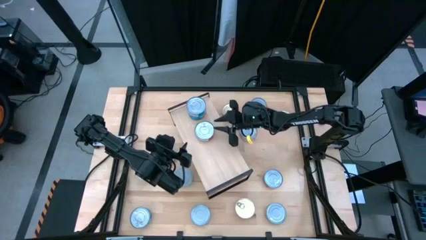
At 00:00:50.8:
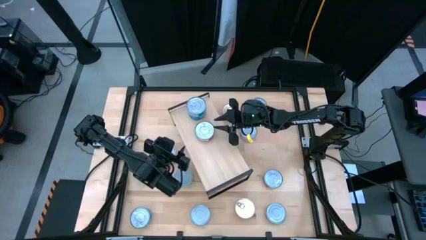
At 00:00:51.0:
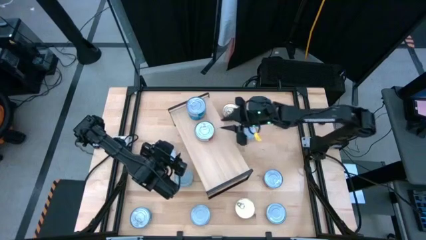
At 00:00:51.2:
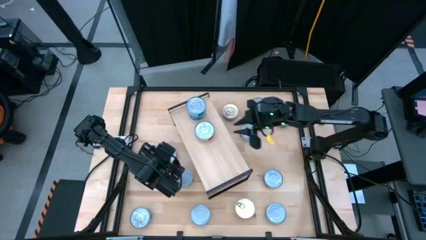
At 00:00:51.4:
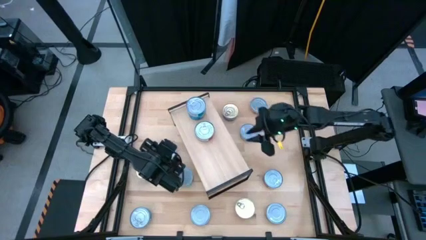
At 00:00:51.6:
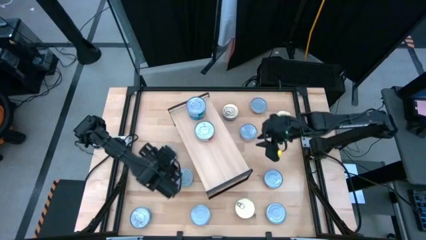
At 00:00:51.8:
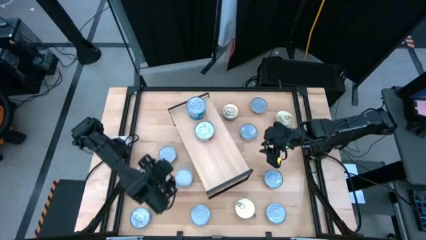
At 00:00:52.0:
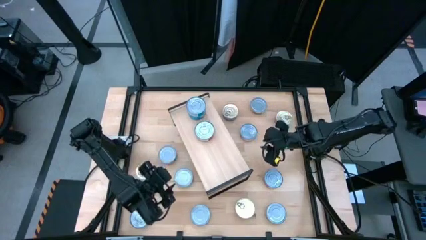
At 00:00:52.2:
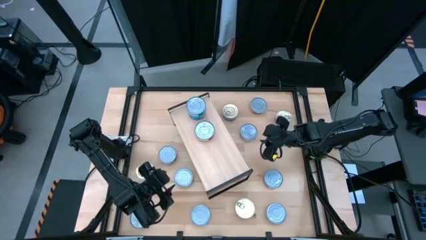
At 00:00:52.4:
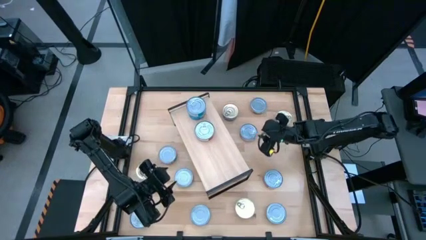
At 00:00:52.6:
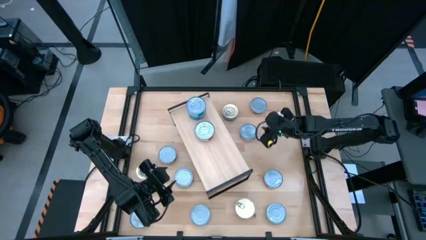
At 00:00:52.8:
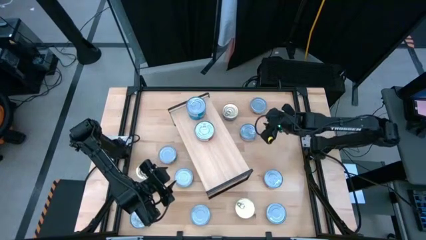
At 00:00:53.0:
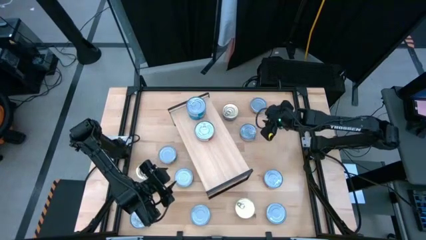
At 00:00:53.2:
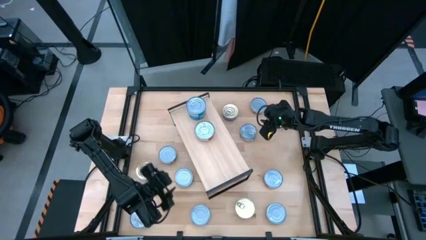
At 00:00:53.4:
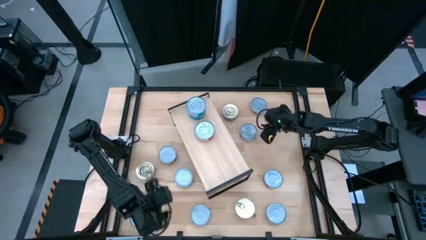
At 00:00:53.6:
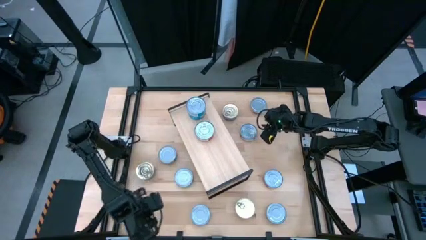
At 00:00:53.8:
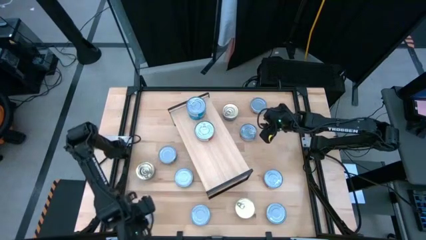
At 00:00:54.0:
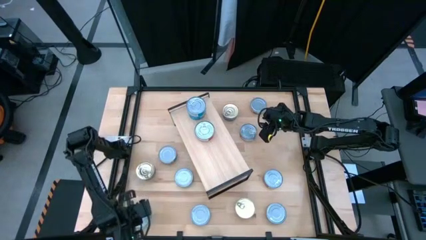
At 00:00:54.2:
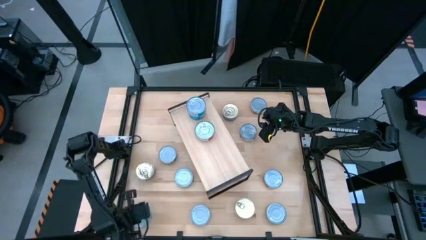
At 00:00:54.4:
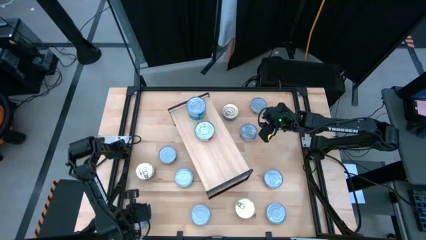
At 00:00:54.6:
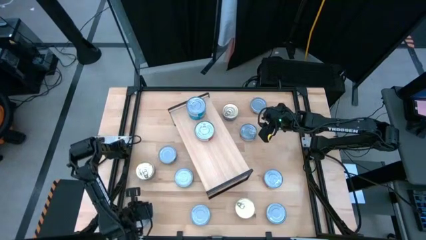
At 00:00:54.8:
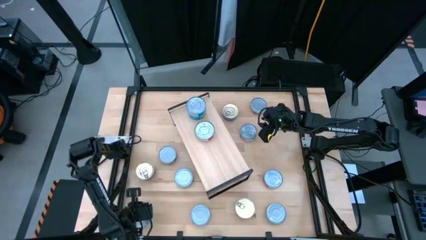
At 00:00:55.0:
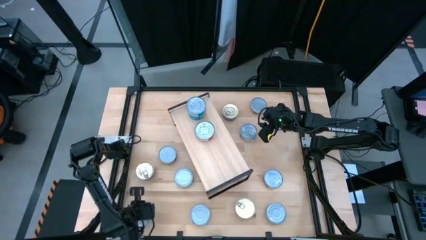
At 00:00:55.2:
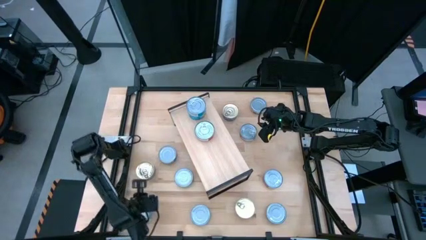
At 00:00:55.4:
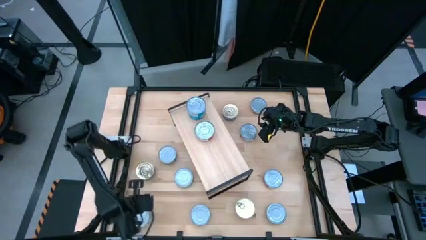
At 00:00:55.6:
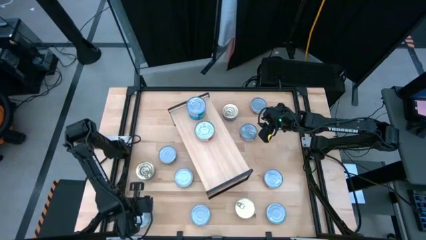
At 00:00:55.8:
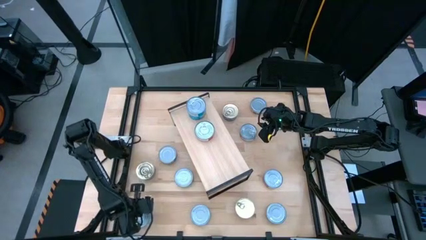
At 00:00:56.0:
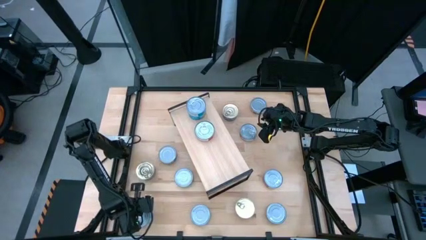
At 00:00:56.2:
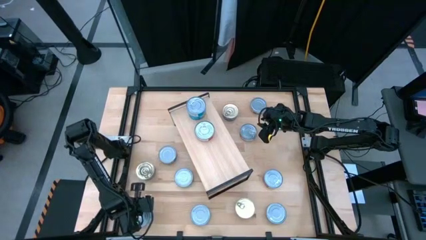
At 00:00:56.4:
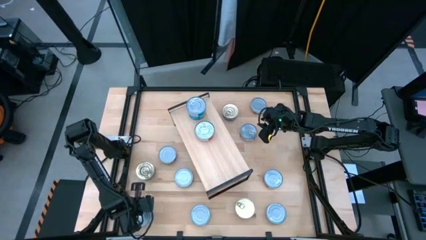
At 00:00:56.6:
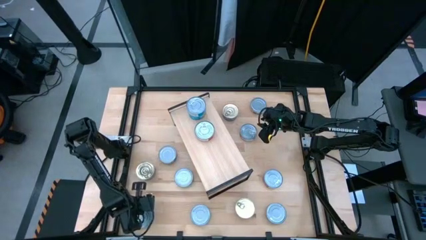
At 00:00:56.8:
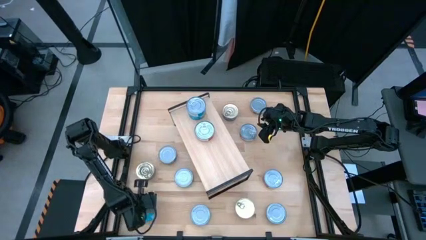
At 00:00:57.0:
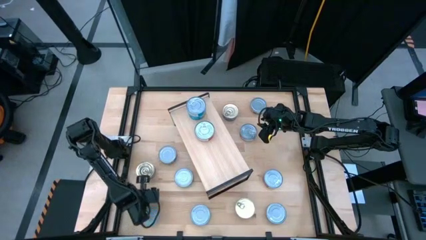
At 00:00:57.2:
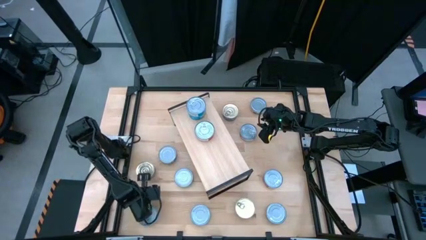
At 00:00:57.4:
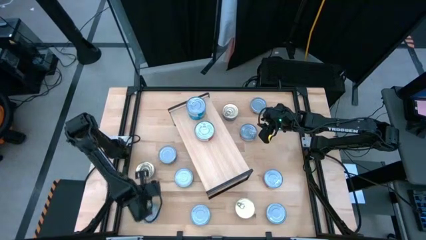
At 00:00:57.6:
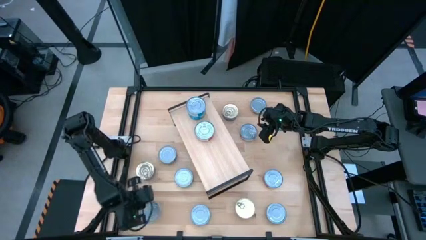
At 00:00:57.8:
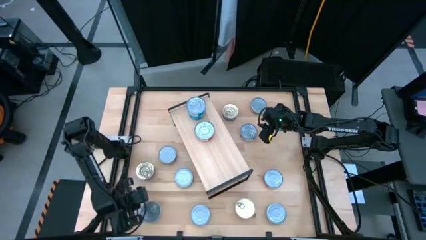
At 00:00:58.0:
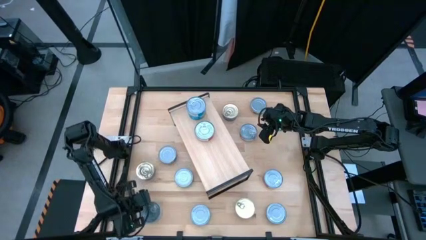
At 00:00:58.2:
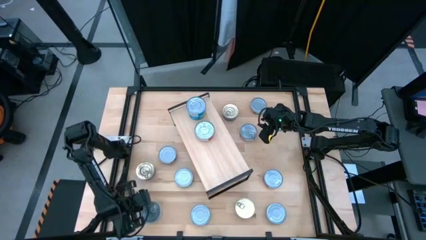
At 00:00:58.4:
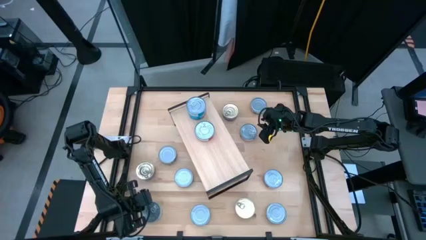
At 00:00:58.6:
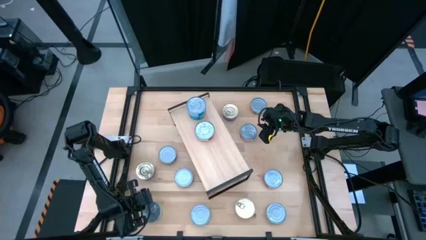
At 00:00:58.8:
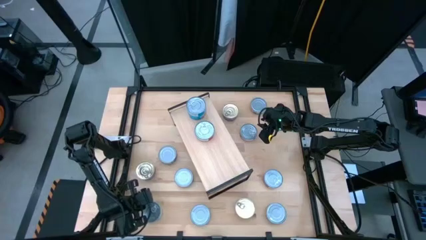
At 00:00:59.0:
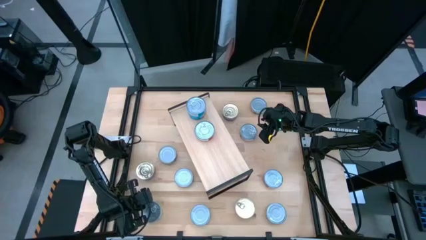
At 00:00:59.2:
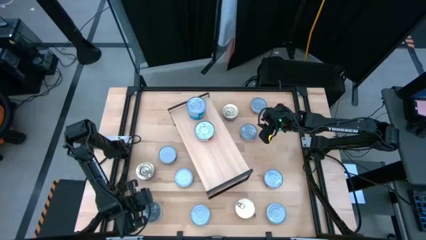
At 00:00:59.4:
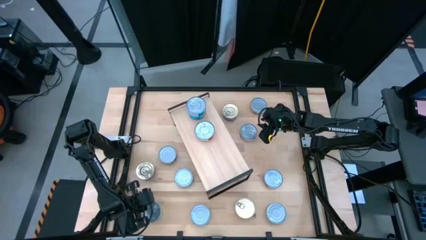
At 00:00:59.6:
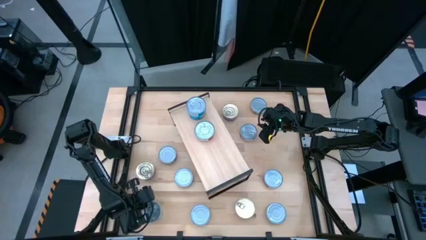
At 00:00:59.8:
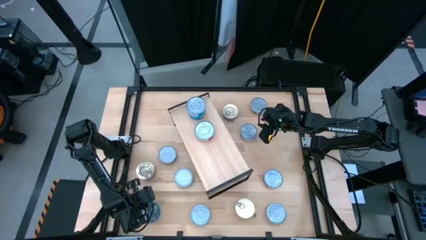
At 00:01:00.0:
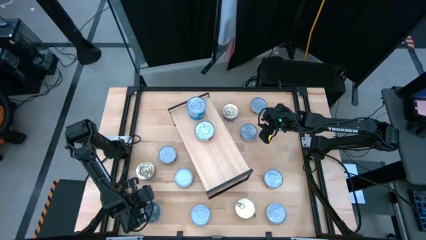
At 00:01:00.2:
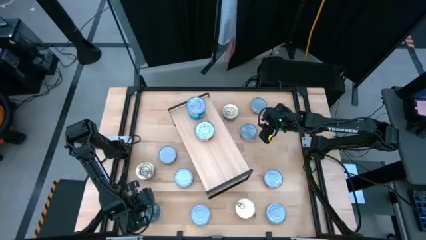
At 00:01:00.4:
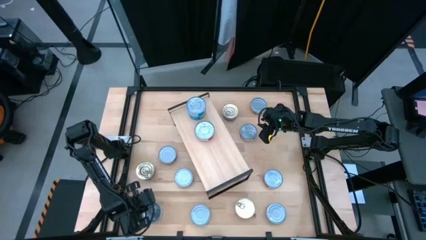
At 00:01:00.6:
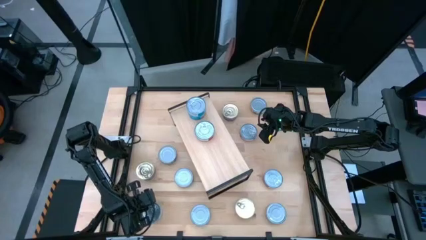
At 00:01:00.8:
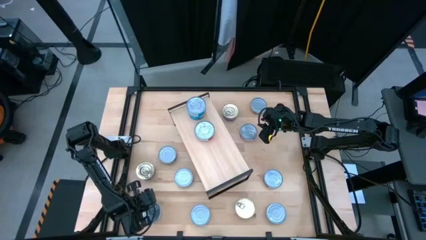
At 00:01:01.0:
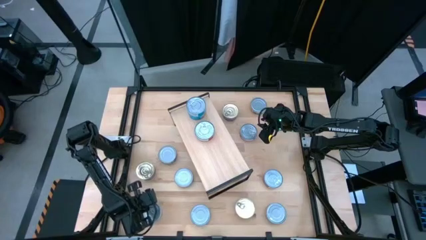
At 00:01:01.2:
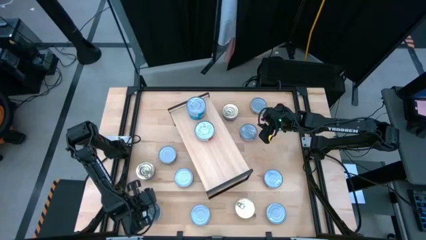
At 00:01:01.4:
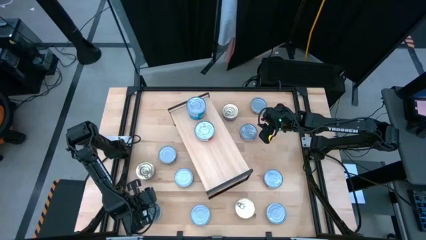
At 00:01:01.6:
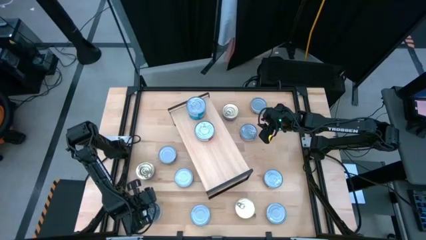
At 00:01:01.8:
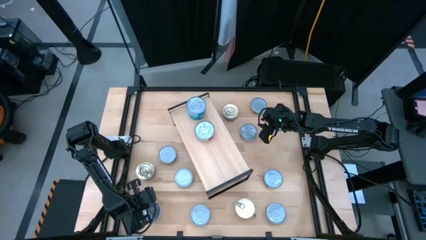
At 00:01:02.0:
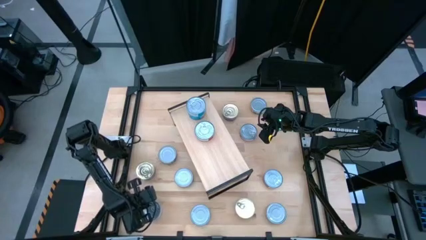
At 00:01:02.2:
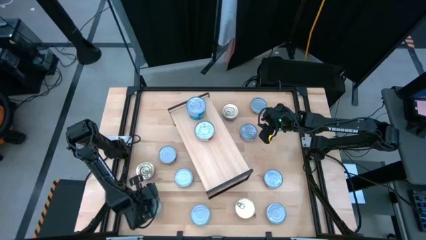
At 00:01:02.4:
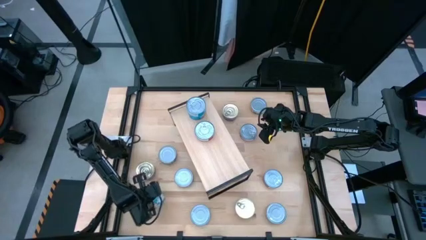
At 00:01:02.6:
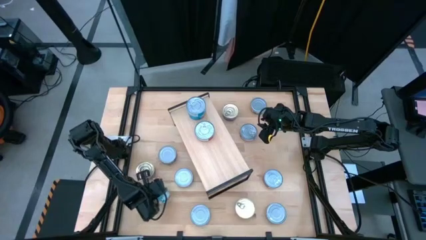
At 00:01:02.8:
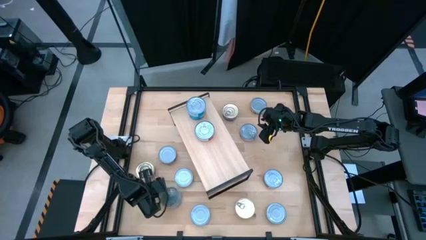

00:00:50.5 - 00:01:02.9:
Task: Stack canned seafood by type on shelf
Stack the yellow-blue tuna can on top of the yellow-blue tuna cans on the shelf
